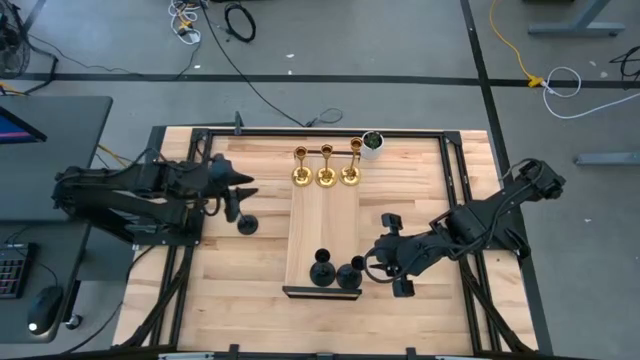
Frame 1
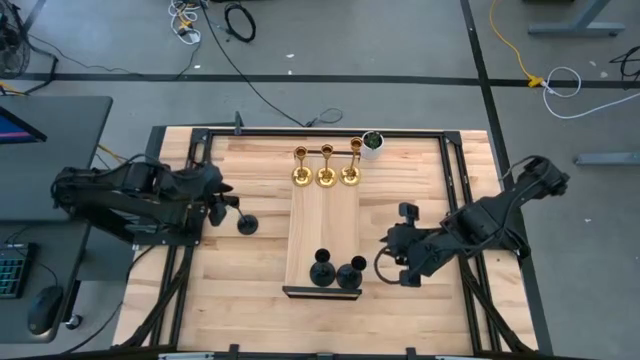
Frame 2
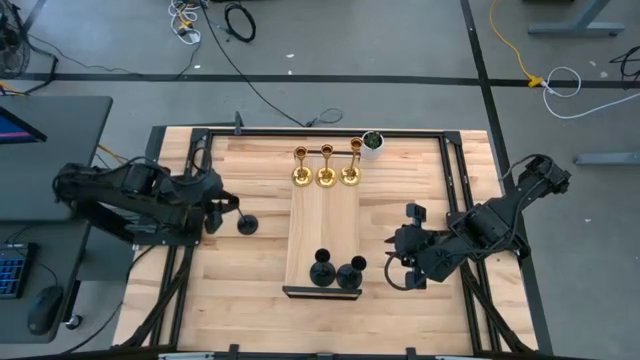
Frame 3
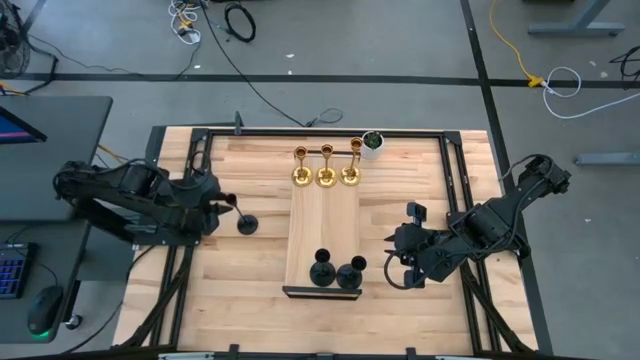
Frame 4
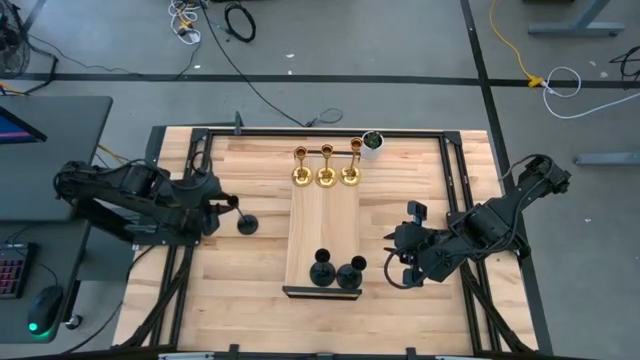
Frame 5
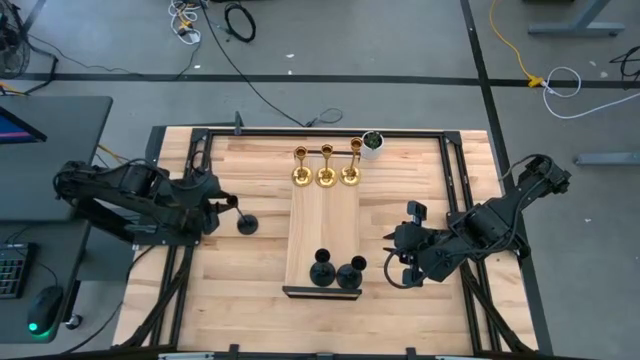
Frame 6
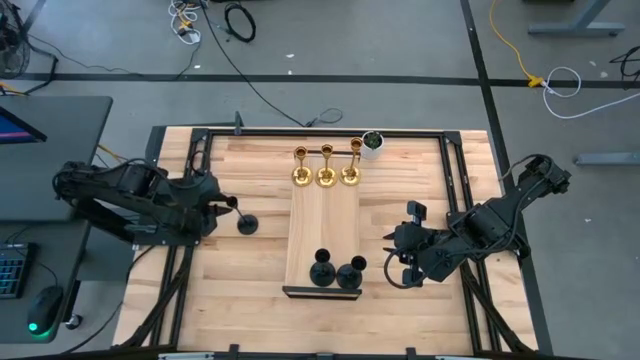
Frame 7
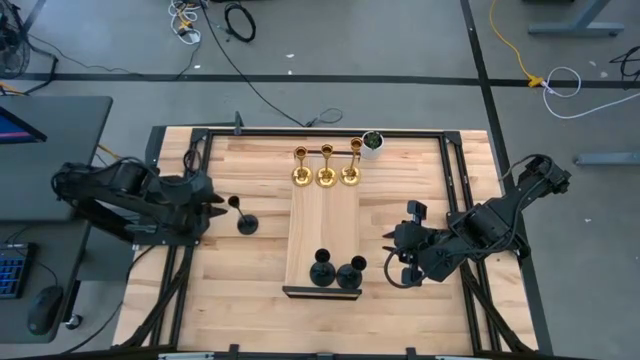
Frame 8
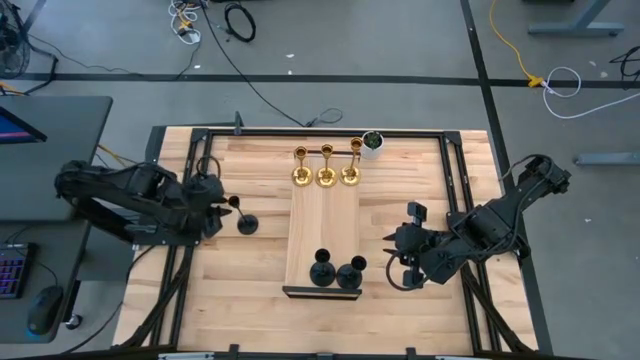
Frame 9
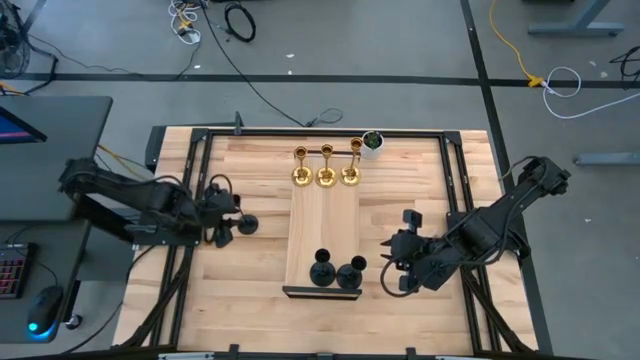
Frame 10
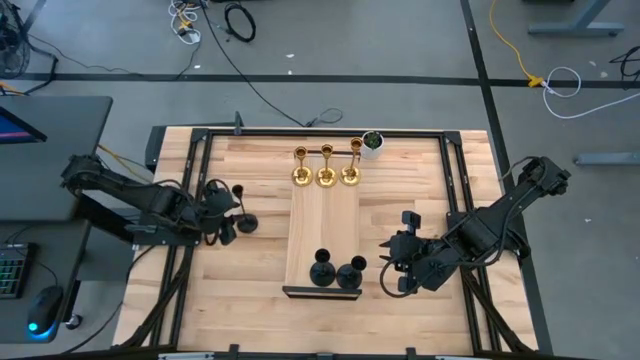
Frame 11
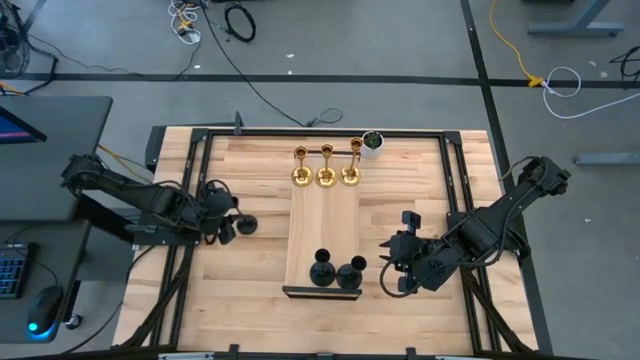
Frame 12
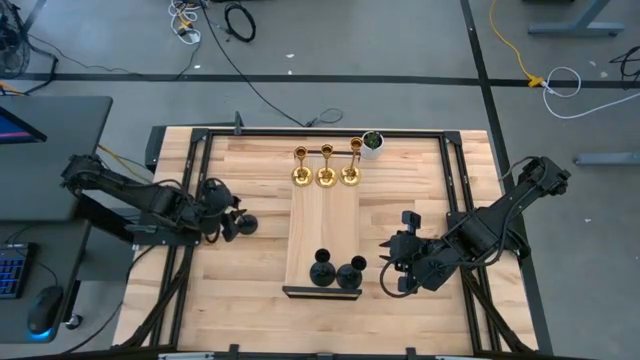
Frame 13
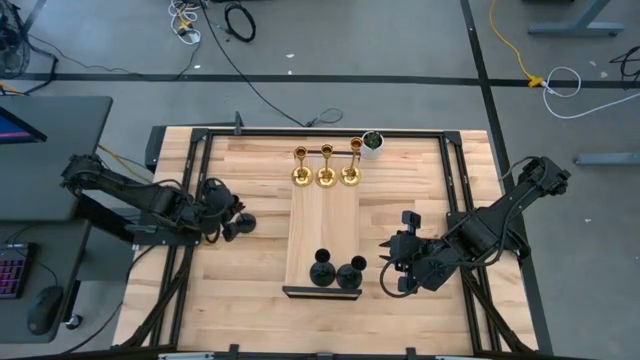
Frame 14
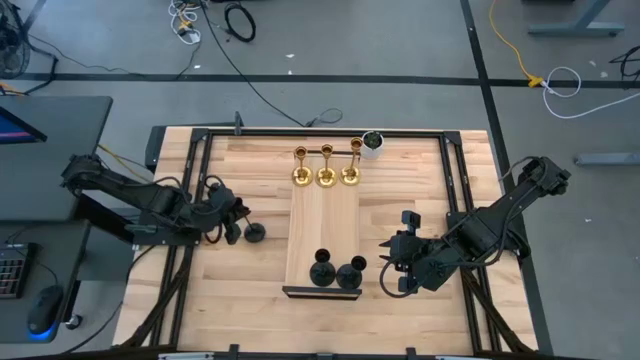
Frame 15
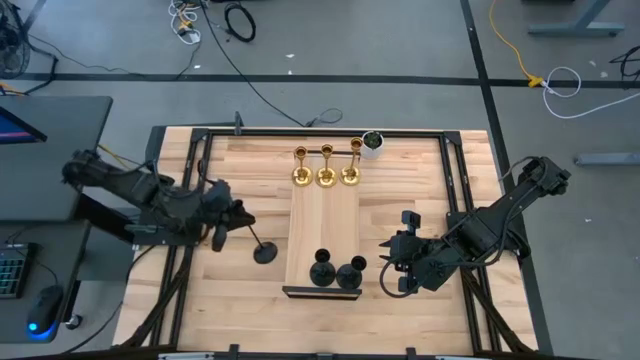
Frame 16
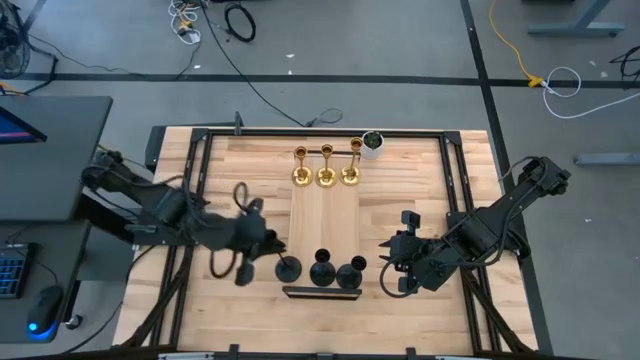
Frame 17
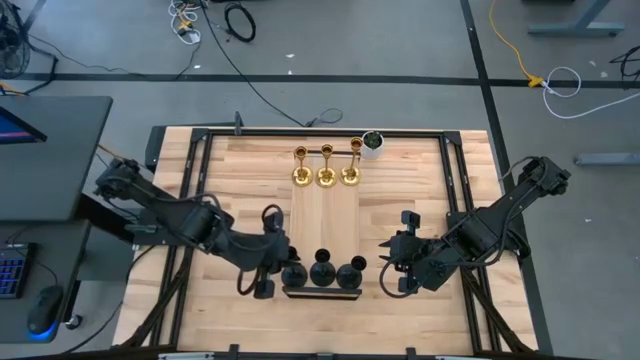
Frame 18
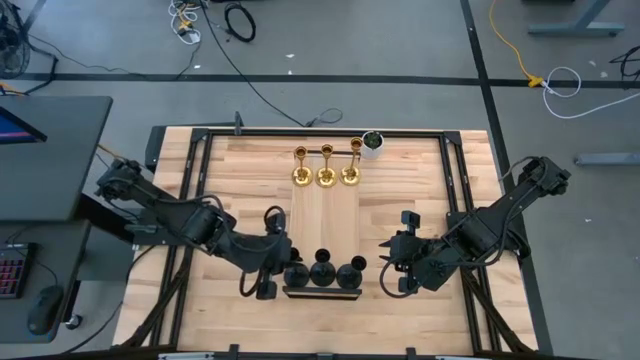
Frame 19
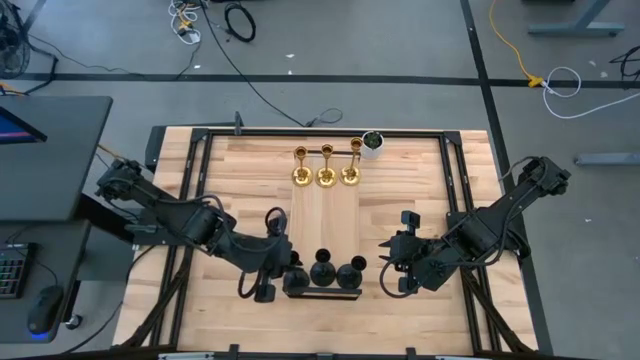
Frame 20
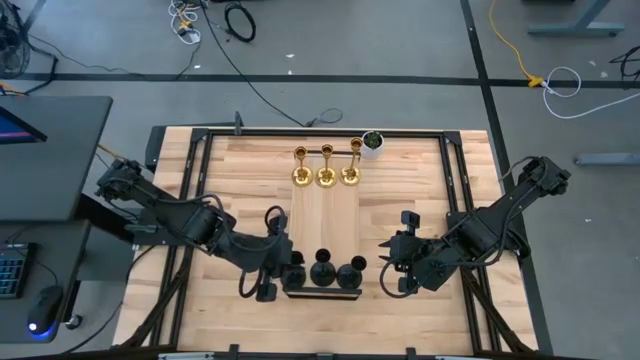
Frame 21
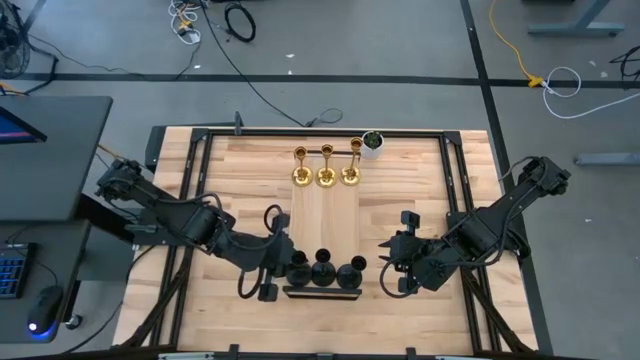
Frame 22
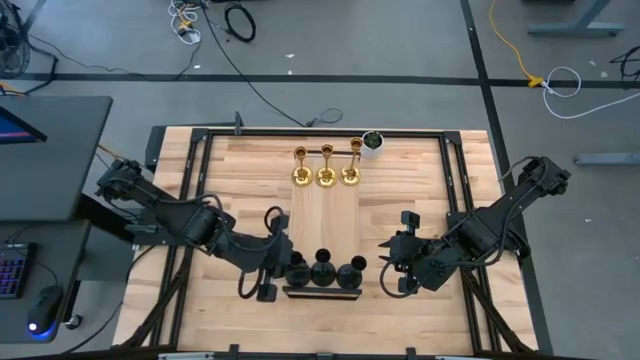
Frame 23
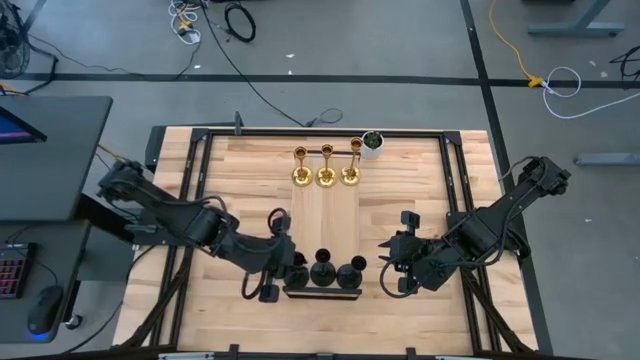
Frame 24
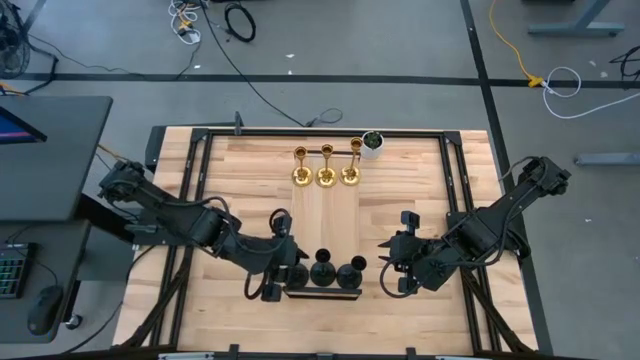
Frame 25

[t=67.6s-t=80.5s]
Task: Pick & Place candle stick holders
Put the black candle holder aligned with the black candle holder on the shelf

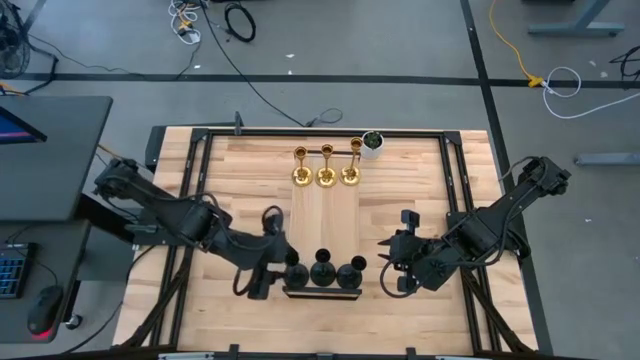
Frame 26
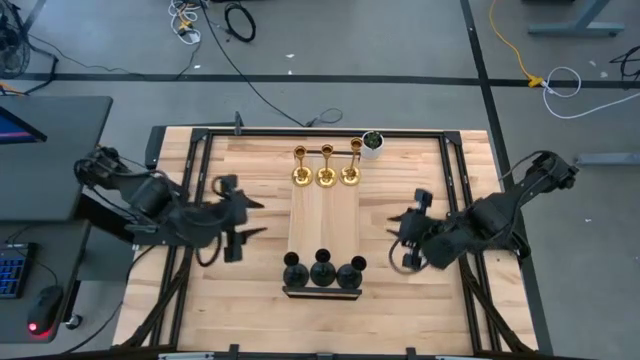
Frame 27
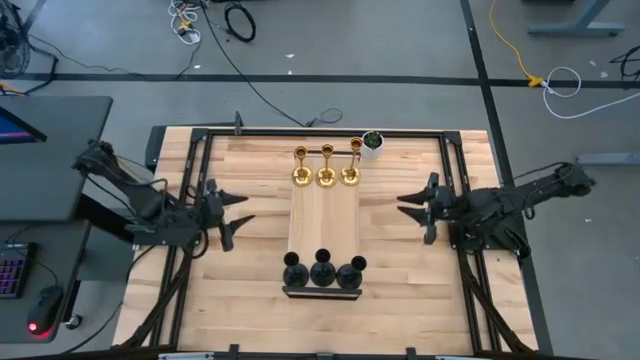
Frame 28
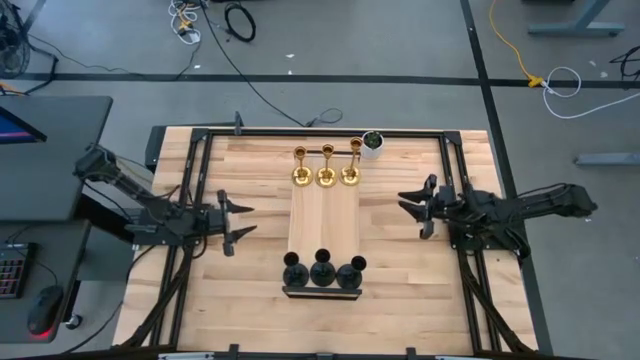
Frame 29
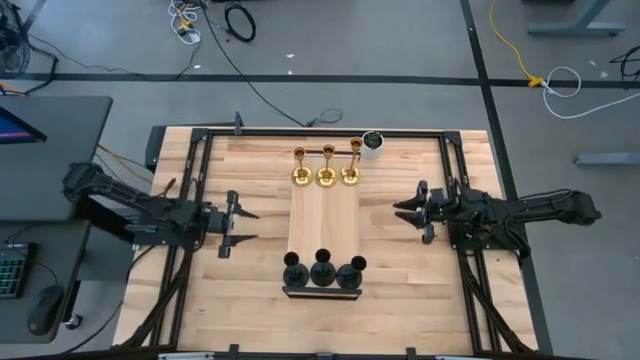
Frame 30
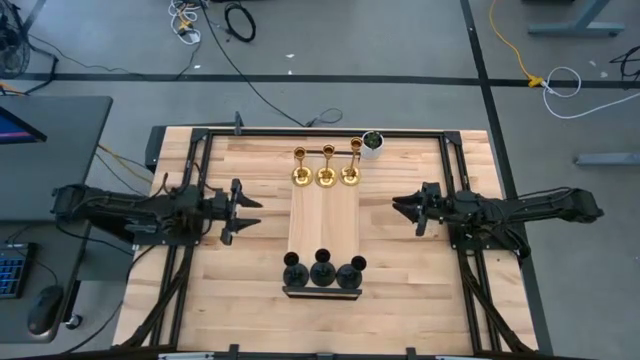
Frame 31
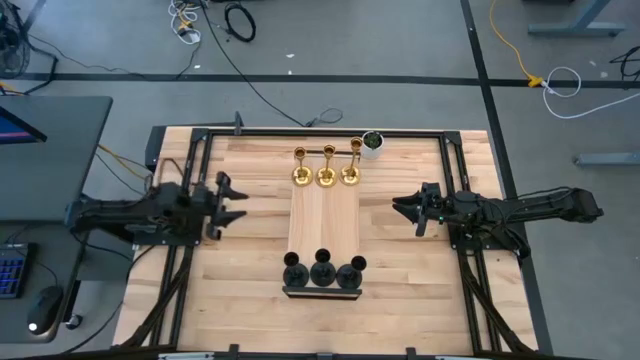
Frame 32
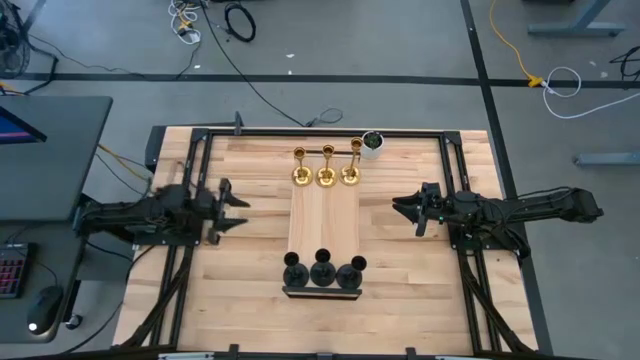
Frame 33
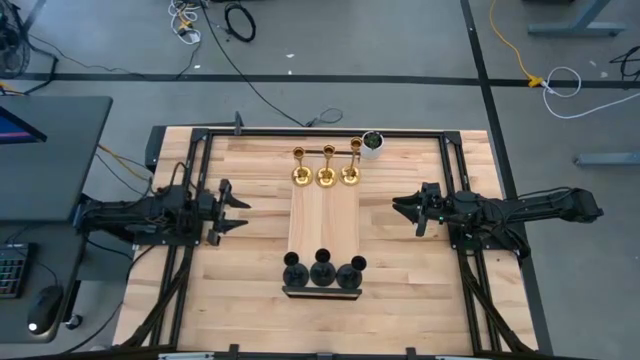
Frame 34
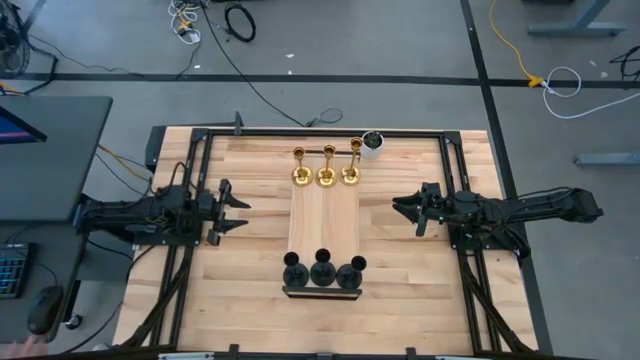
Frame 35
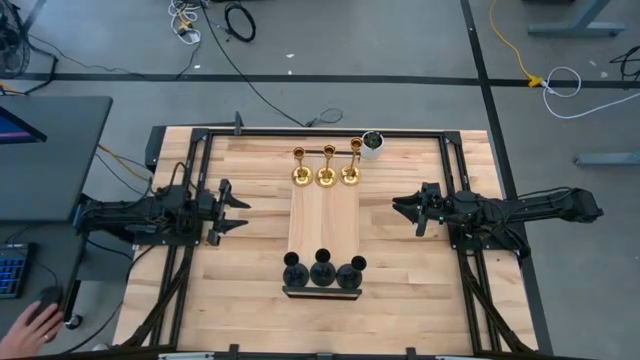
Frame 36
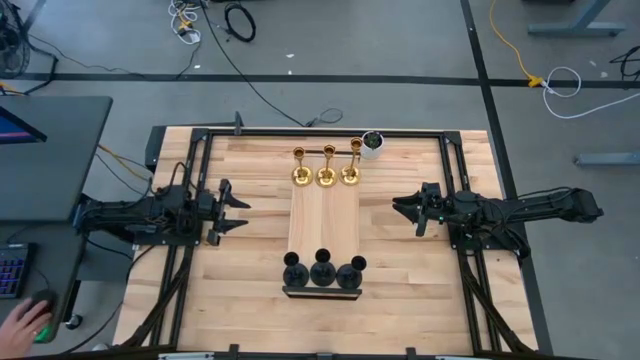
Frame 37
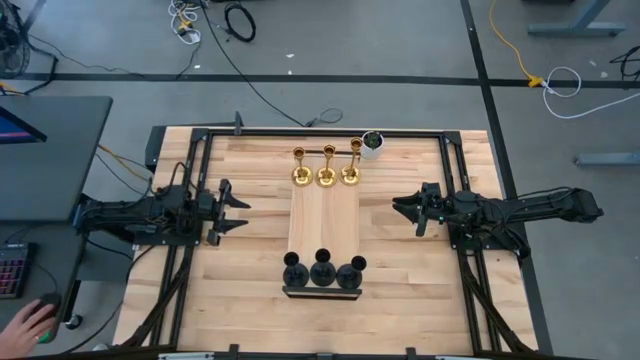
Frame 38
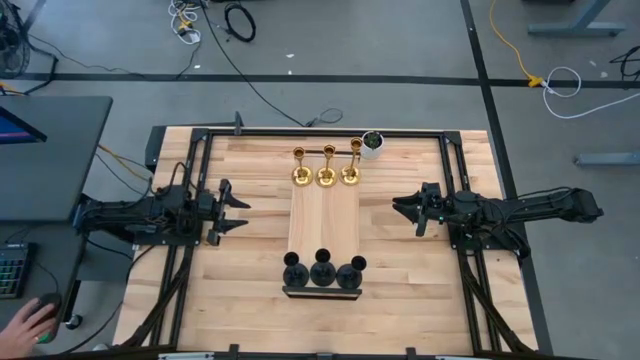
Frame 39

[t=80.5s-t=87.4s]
Return to Home Position

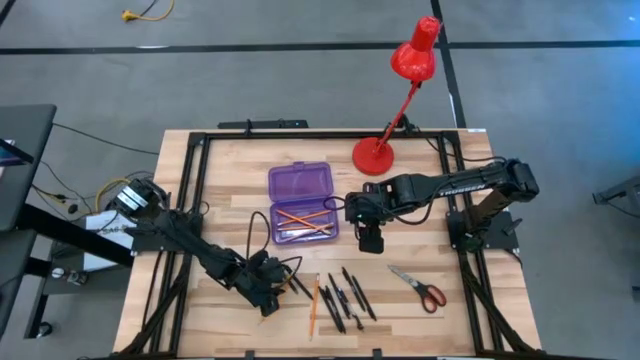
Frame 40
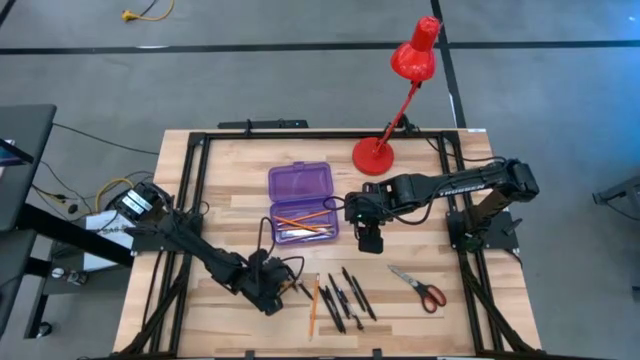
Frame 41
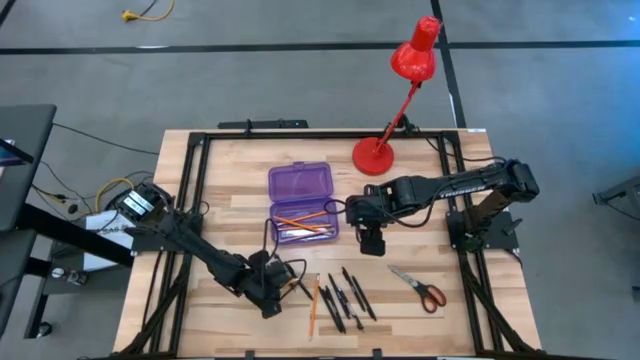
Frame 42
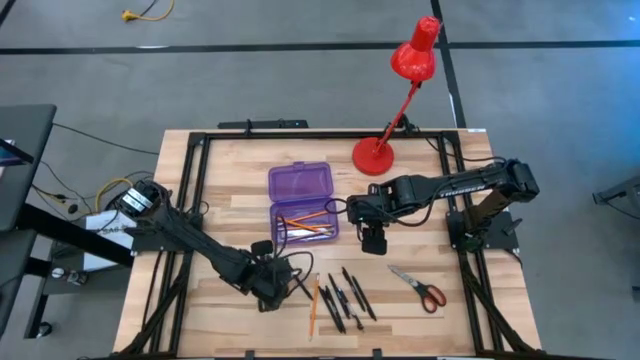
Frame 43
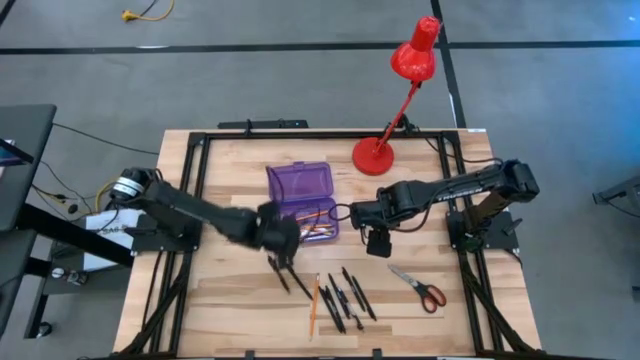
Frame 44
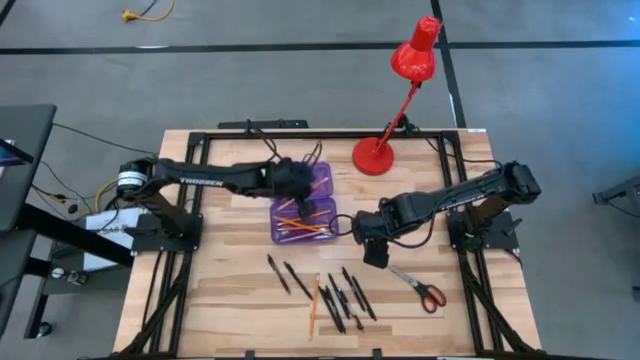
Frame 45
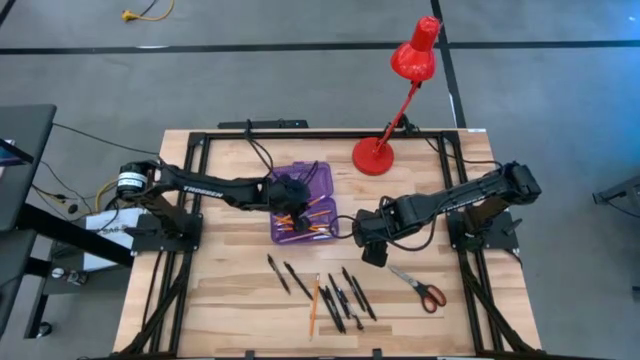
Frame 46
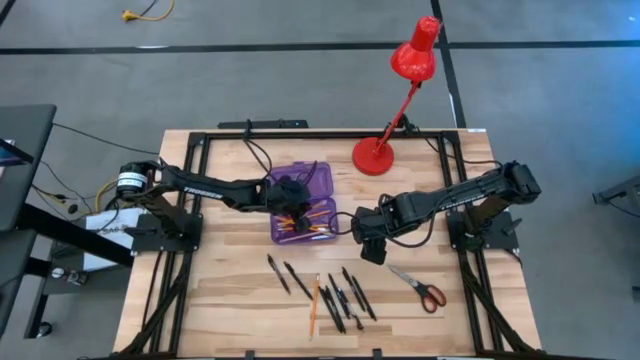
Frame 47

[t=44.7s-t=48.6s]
Task: Pick & place school supplies into a supply box
Put the orange pencil into the purple supply box
